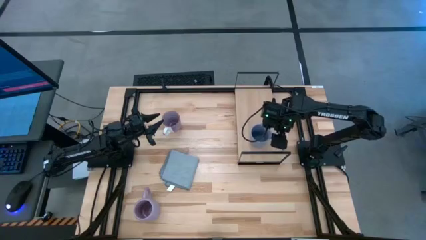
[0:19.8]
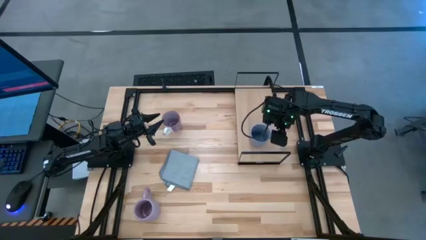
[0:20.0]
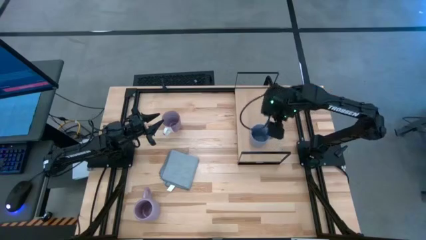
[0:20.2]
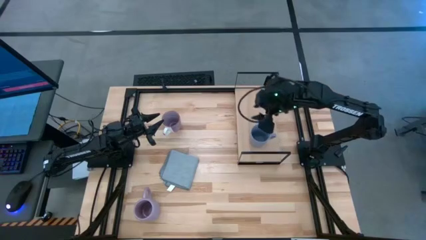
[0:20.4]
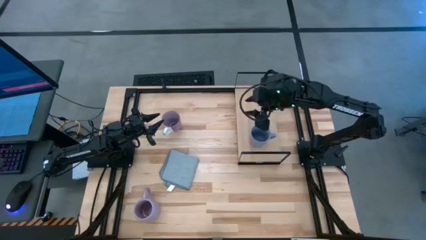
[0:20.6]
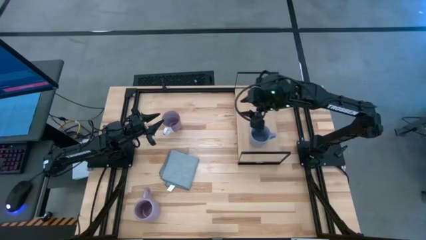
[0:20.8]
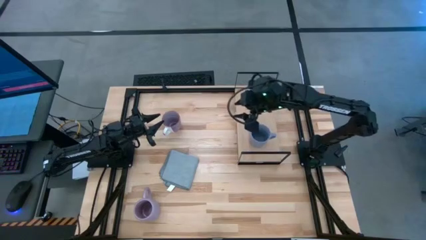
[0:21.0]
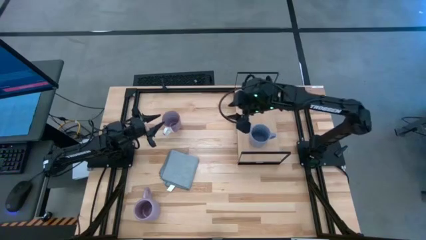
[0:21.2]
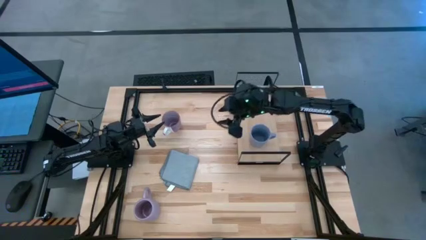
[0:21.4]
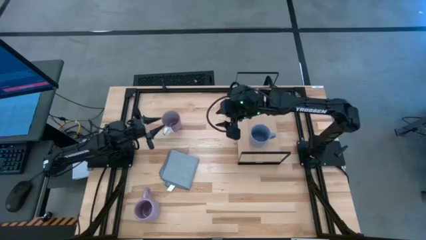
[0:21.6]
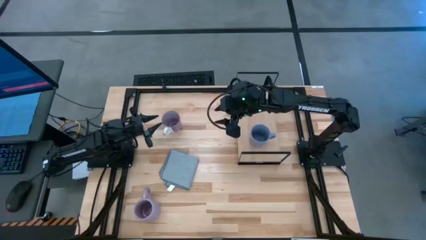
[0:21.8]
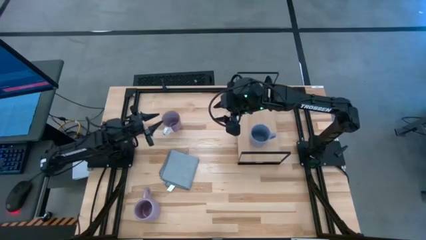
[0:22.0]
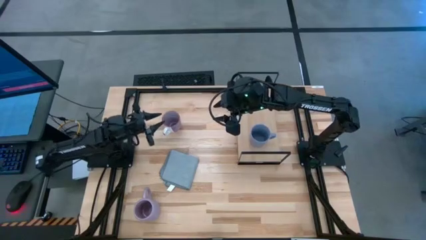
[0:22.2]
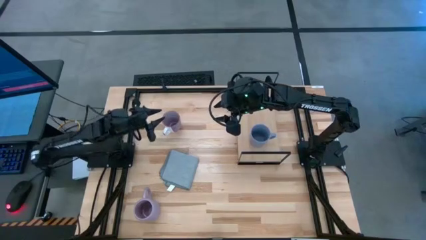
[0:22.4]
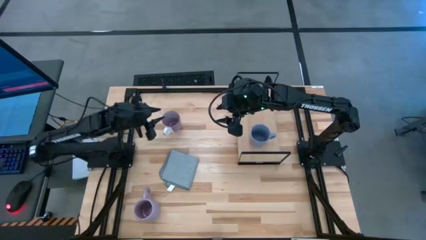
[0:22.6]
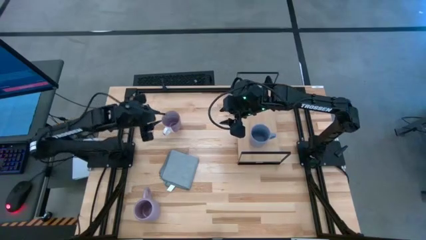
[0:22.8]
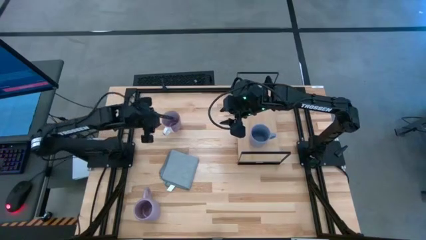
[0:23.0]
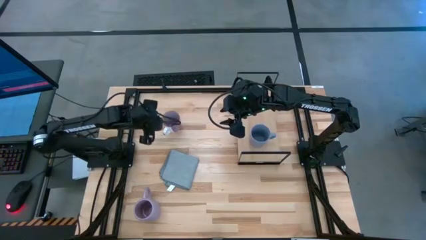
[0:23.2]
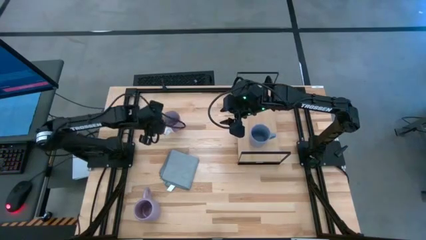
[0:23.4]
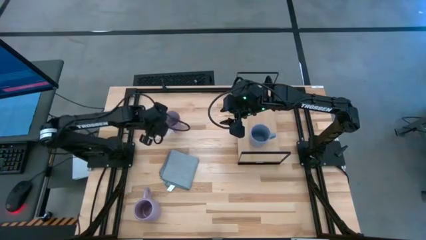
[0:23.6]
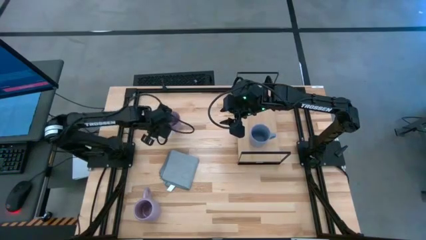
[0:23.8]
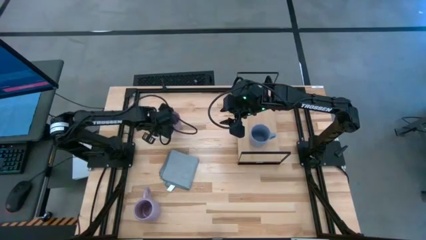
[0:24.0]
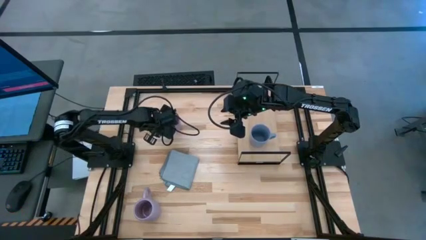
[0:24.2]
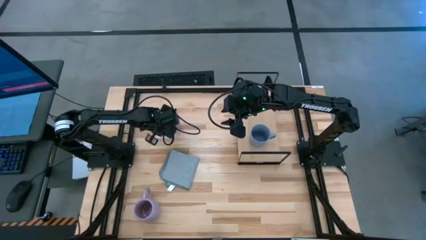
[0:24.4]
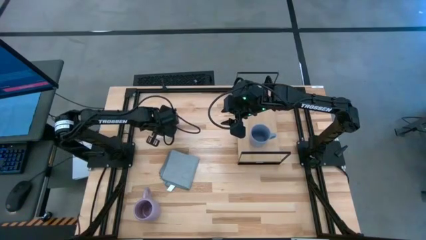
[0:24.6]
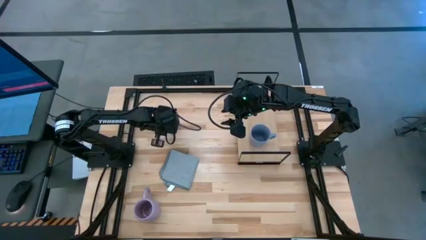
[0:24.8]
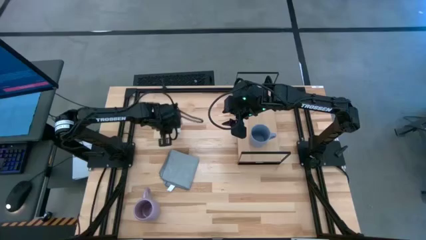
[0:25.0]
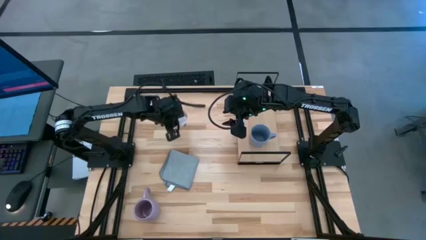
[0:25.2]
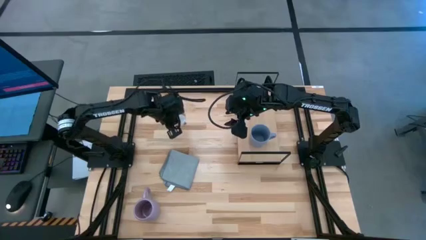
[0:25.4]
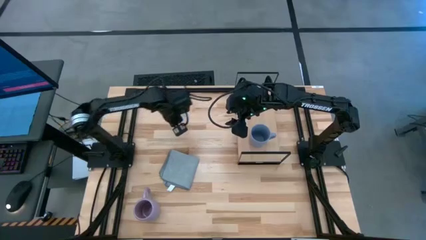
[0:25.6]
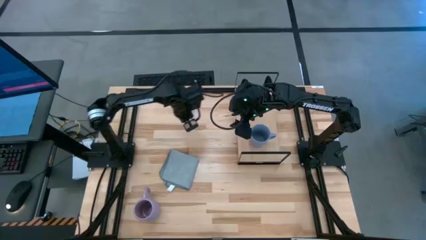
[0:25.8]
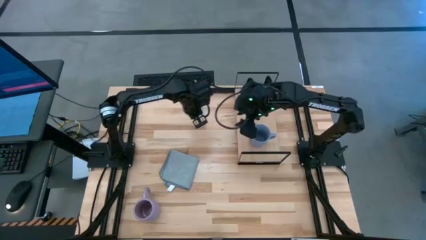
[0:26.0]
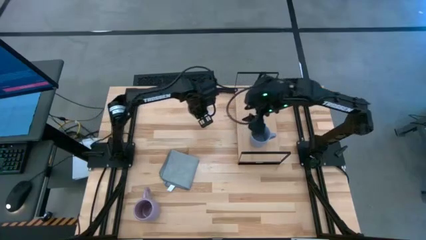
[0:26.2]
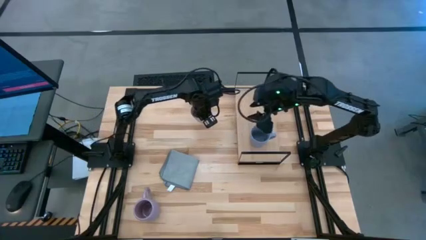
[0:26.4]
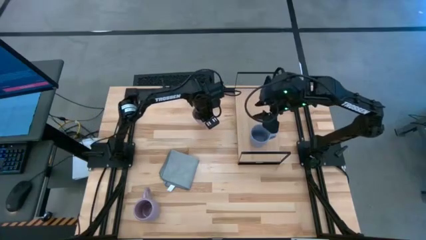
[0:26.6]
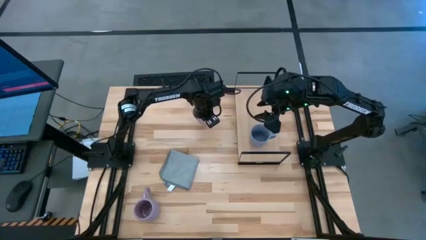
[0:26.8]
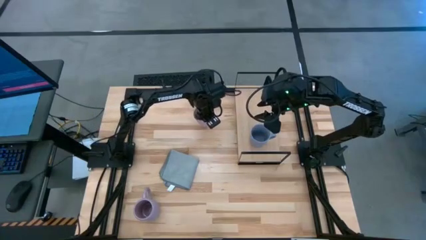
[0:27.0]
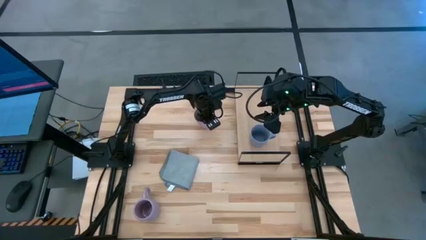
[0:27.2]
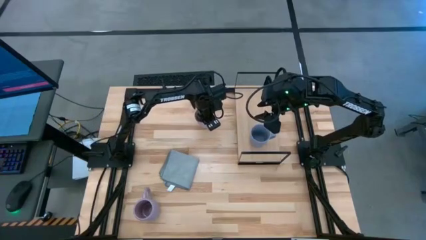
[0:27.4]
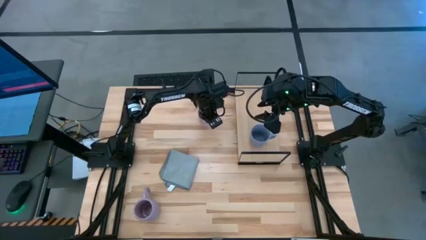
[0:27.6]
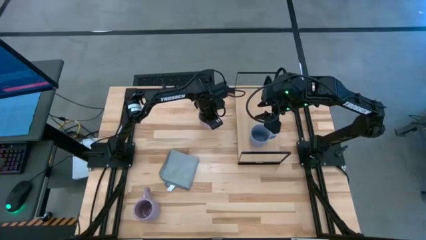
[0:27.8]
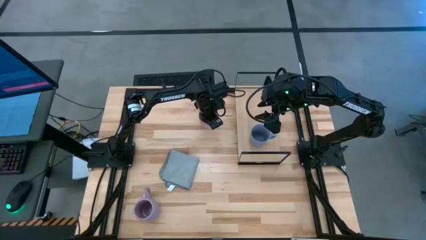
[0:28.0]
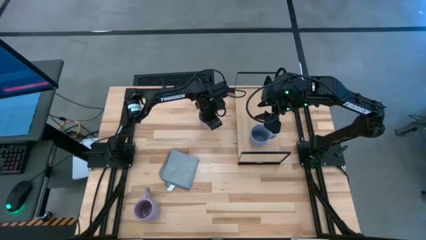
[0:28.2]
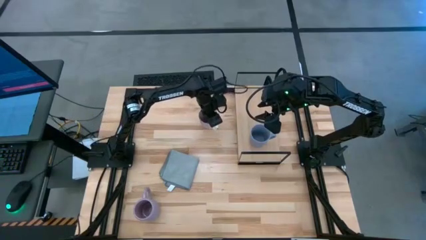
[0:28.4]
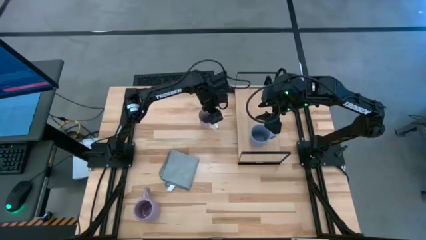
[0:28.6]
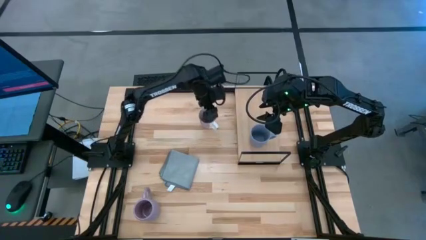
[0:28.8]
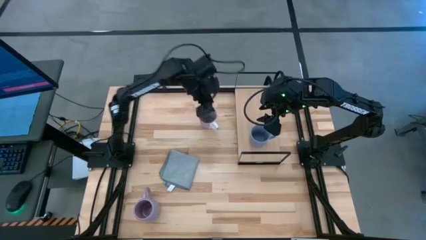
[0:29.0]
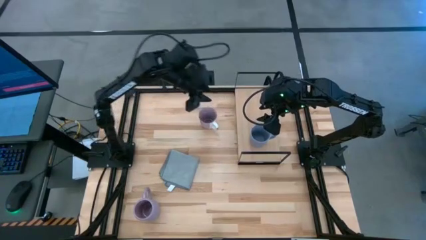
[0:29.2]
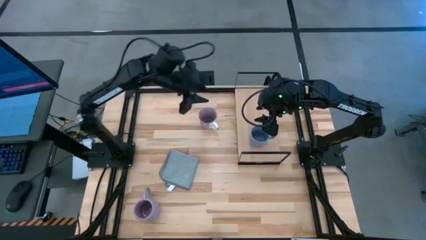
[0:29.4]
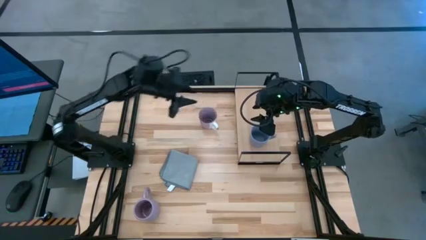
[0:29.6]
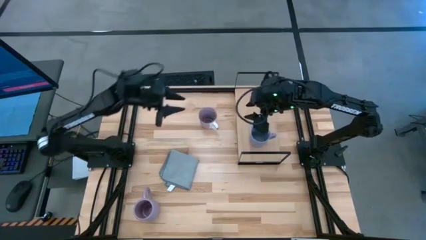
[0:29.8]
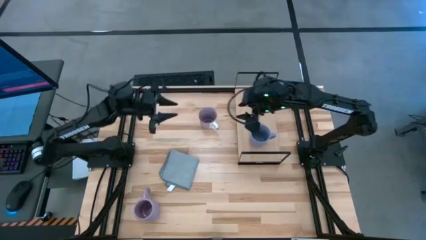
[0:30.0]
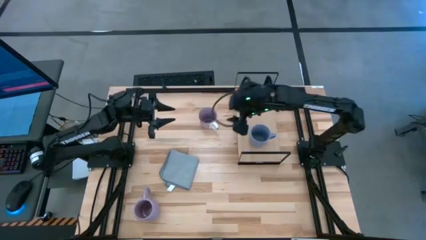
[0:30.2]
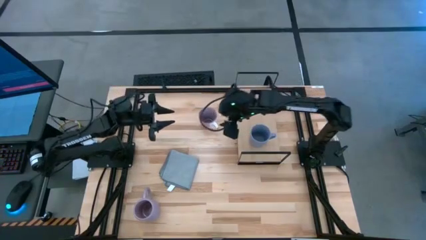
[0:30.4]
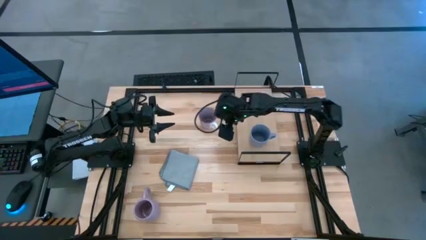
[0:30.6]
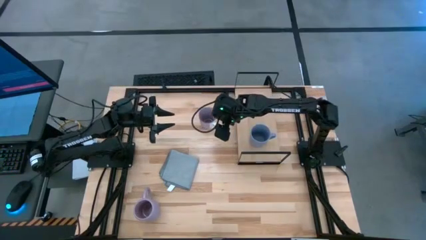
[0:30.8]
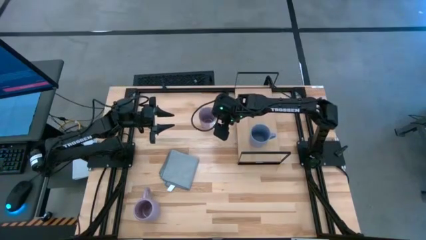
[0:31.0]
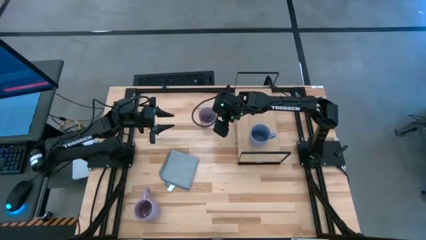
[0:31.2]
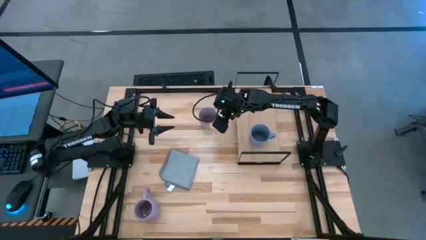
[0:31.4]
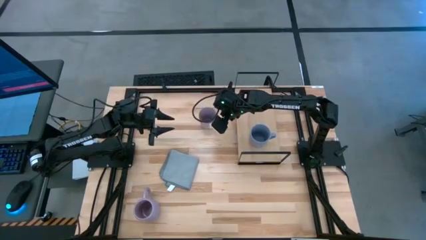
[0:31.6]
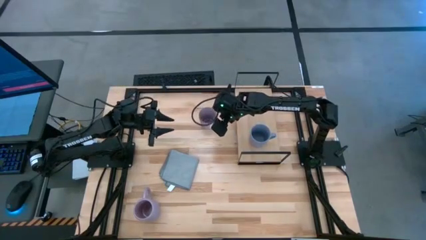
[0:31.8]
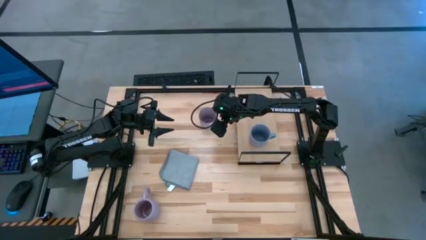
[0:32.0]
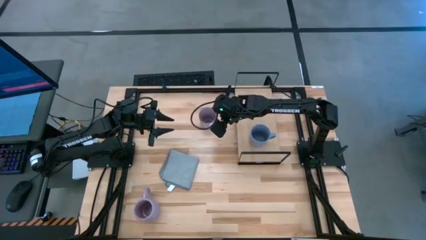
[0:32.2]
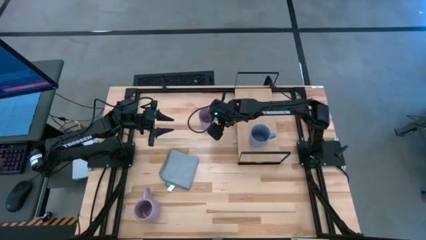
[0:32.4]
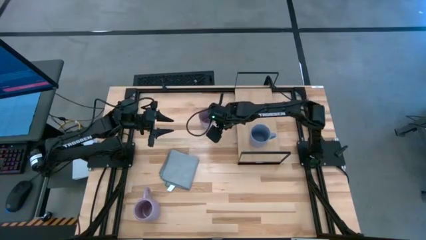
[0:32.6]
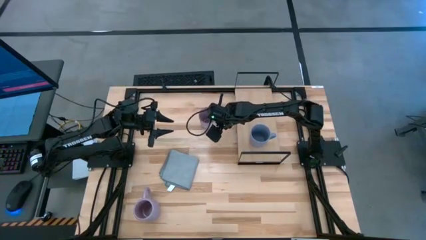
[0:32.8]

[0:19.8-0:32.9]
Task: Stack small to large cups/mugs on shelf
Put the white and purple mug on the shelf
